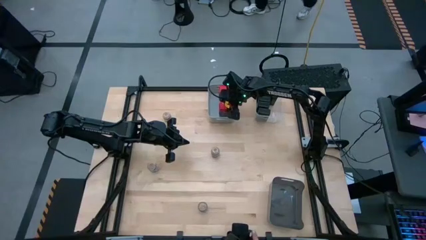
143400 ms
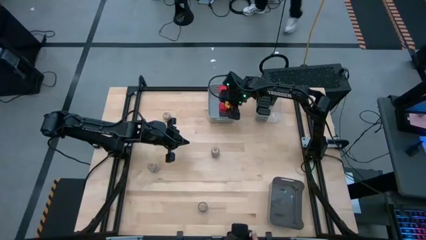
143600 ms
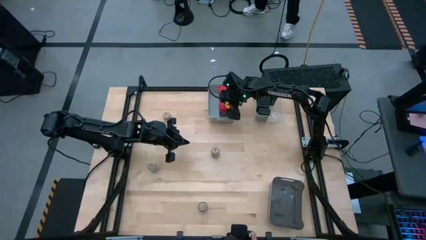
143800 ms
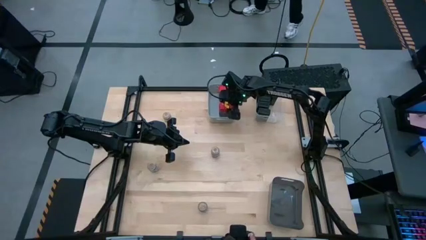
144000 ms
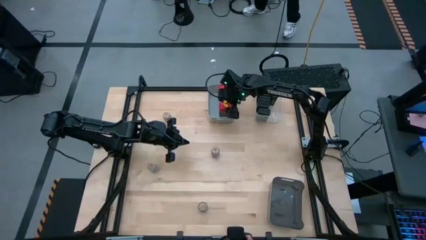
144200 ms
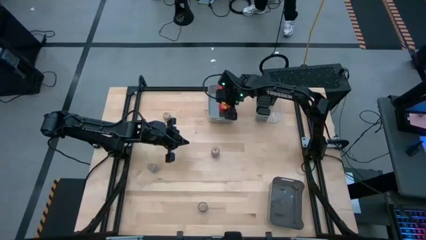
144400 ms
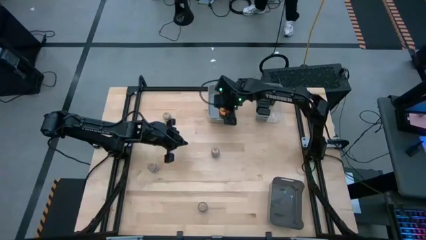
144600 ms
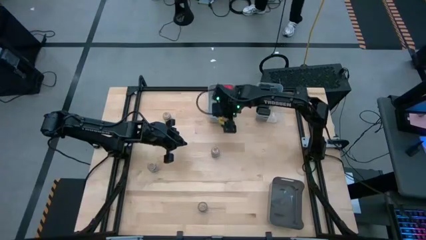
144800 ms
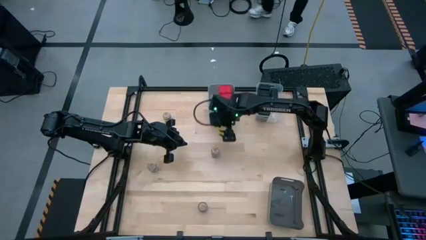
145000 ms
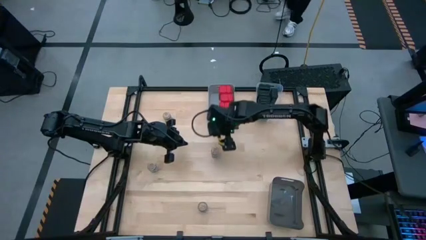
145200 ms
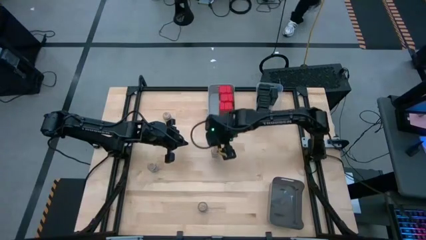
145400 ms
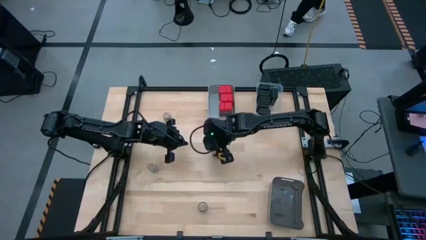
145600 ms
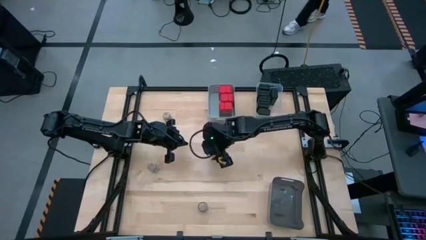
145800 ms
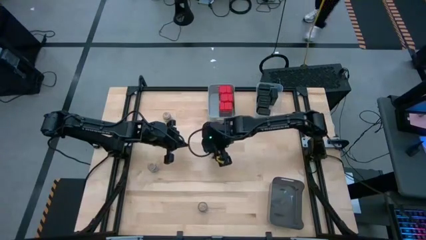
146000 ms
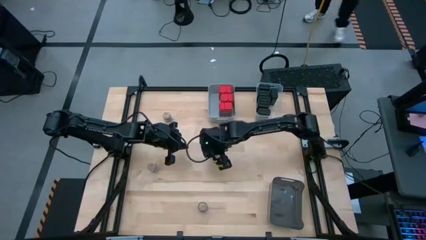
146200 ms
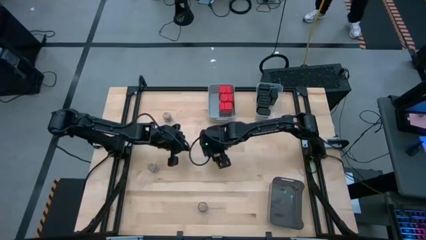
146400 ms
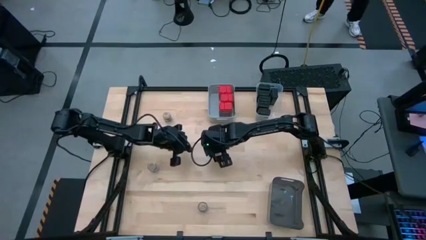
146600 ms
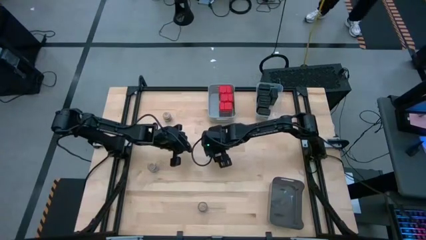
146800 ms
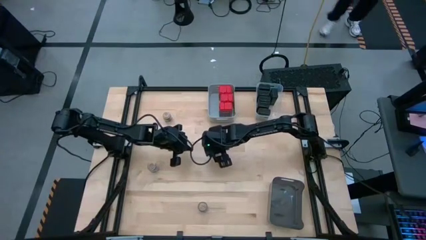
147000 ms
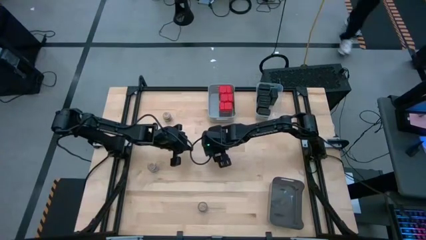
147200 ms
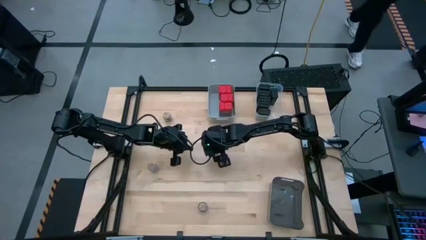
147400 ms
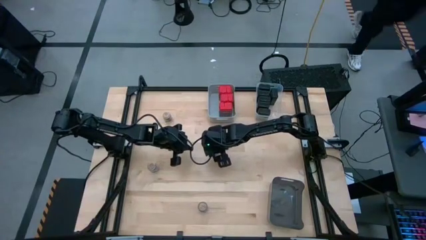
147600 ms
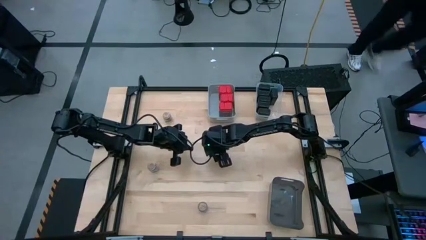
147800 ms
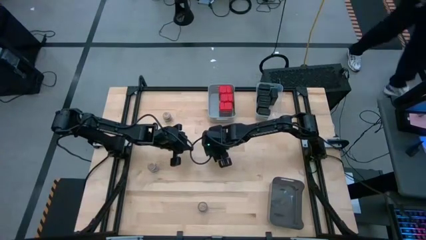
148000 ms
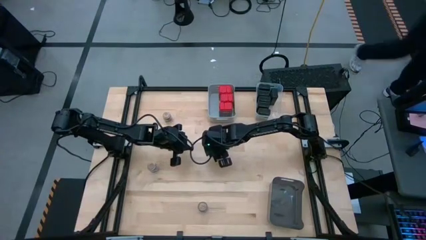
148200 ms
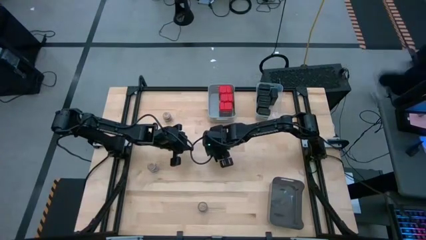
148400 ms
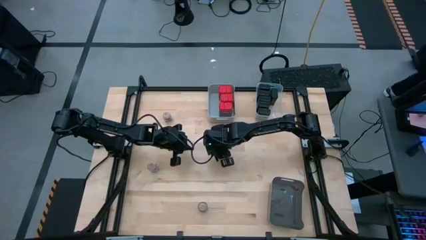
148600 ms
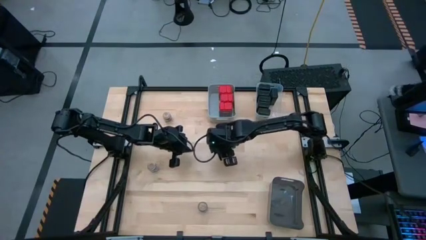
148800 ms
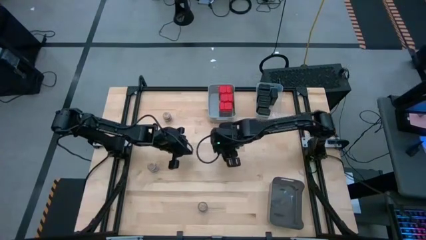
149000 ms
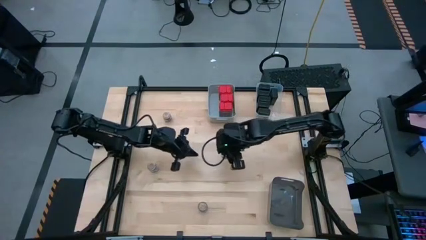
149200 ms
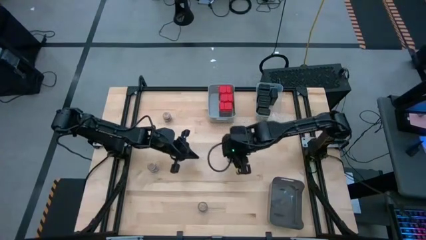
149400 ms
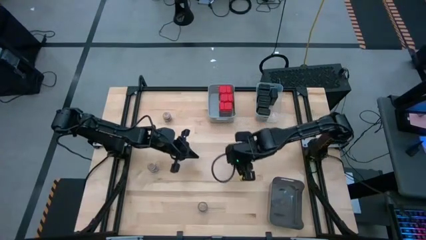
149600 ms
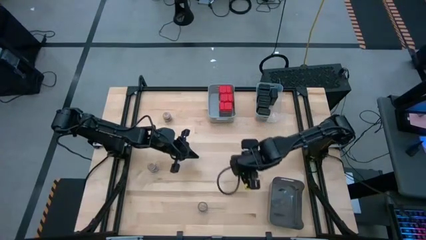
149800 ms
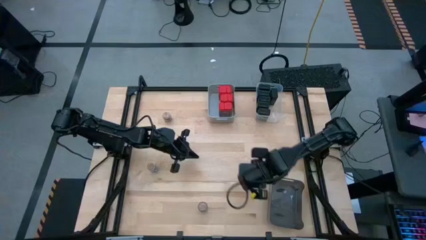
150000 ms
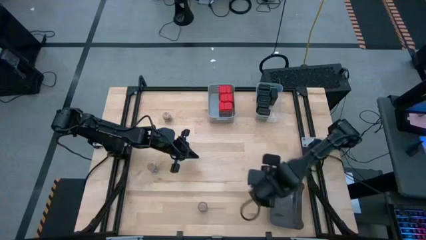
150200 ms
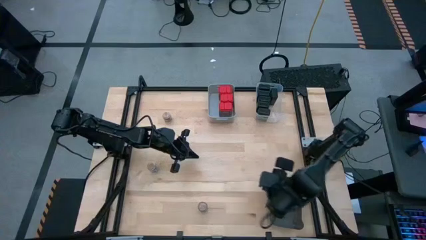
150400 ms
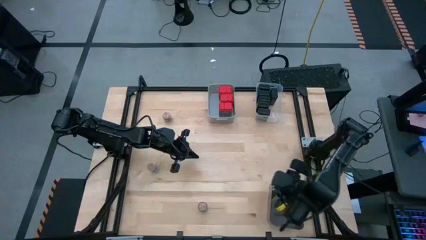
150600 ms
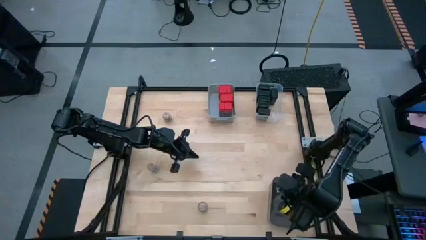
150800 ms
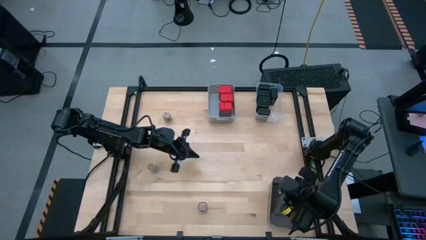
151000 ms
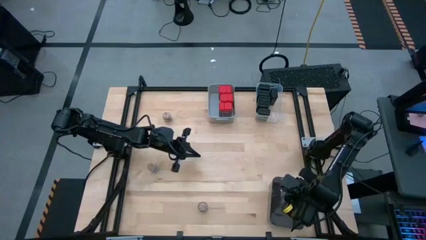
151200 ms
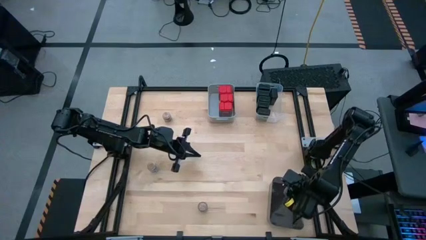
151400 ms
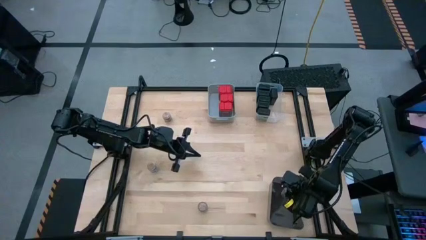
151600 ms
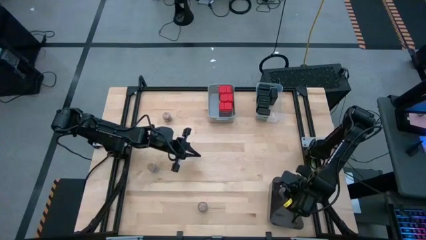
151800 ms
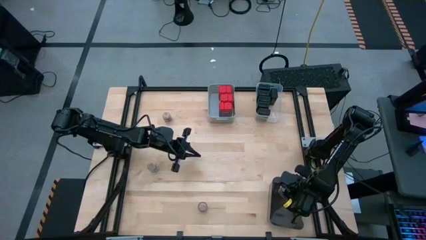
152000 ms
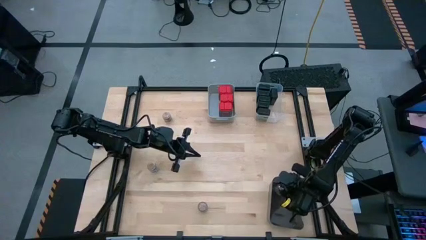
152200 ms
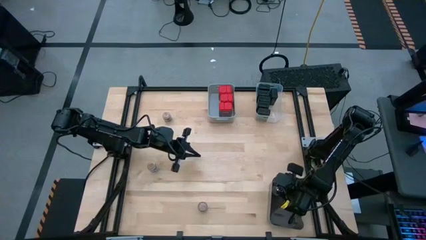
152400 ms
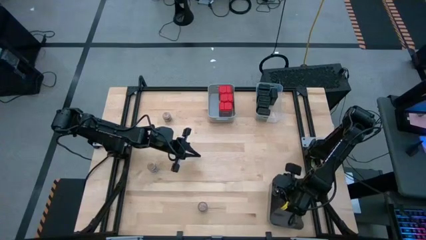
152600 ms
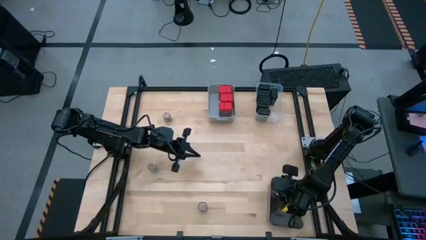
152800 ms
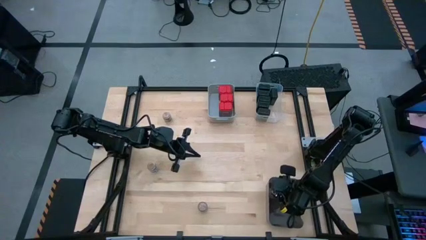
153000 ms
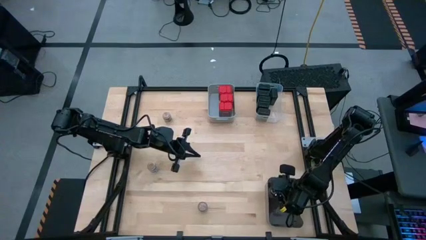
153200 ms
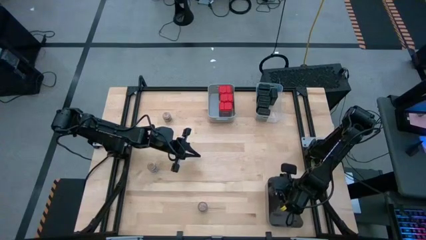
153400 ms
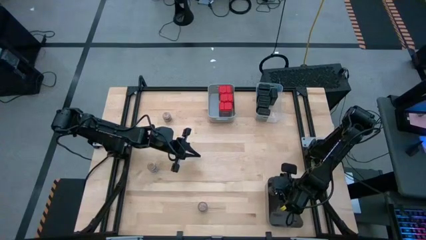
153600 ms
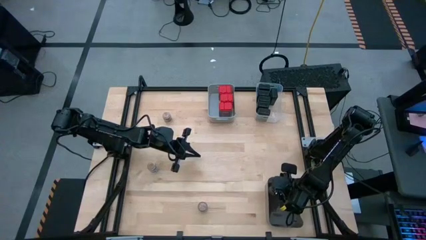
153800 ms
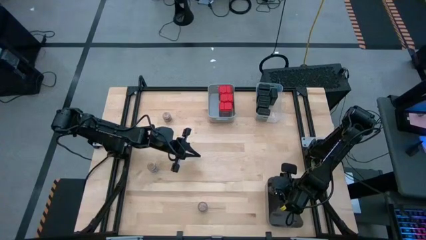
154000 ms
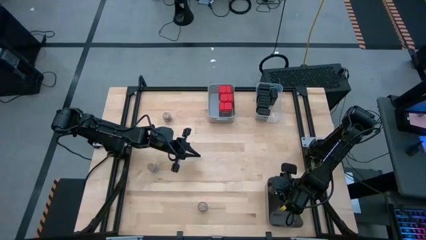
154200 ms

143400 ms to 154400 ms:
Task: Sort spices by type
Put the brown seasoning bottle into the black bin

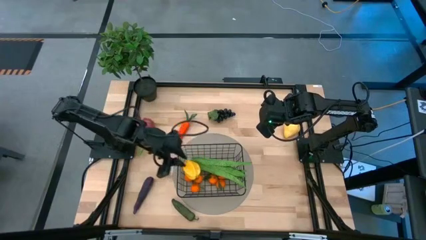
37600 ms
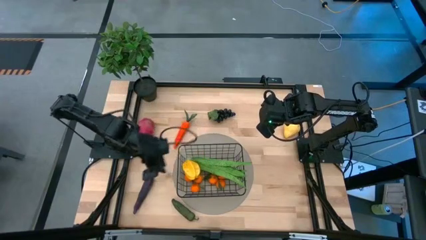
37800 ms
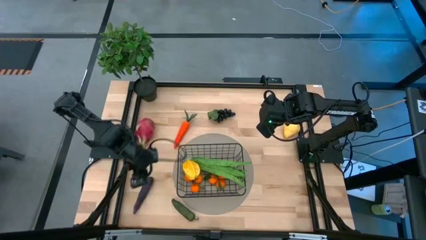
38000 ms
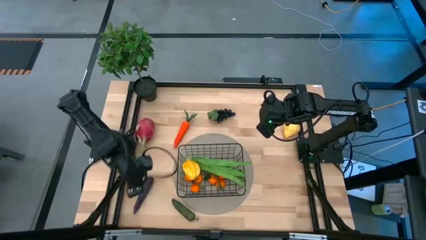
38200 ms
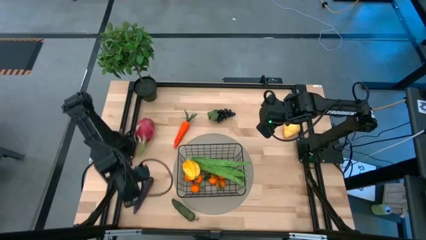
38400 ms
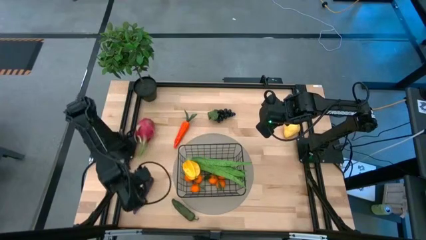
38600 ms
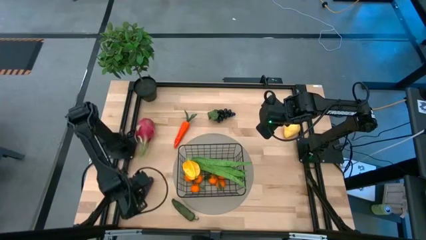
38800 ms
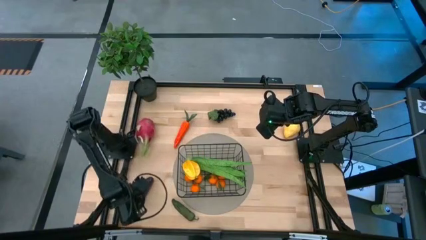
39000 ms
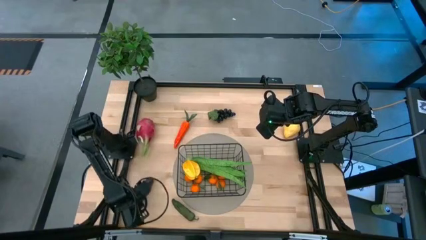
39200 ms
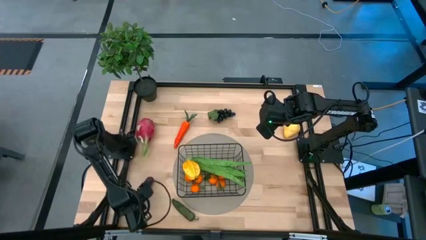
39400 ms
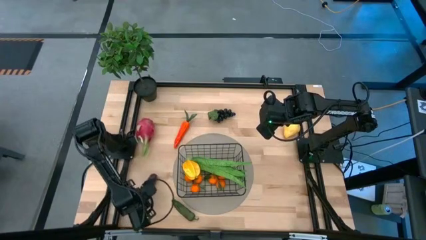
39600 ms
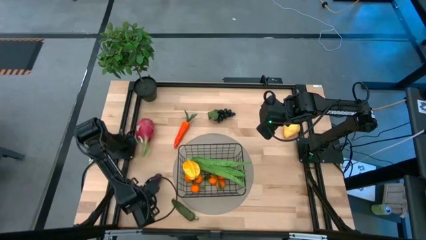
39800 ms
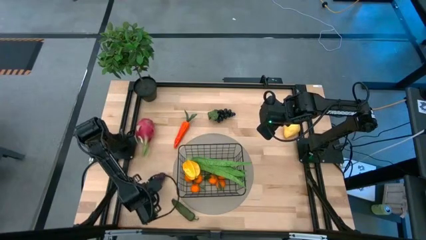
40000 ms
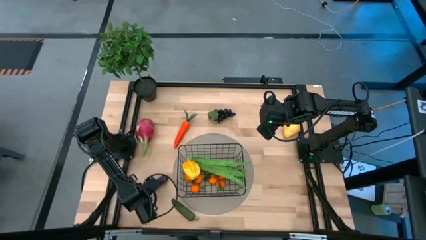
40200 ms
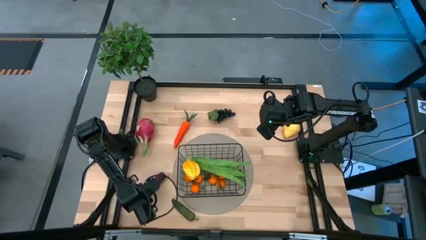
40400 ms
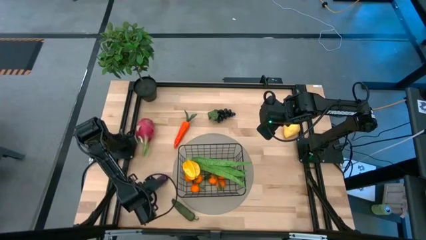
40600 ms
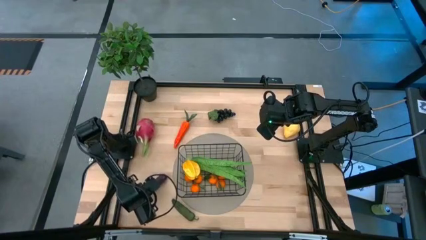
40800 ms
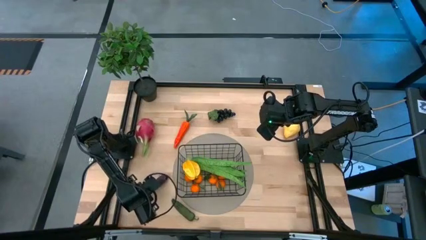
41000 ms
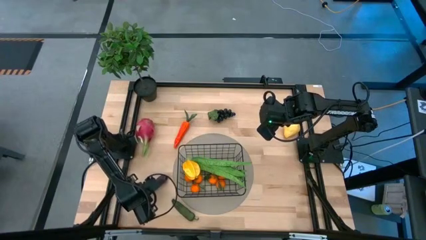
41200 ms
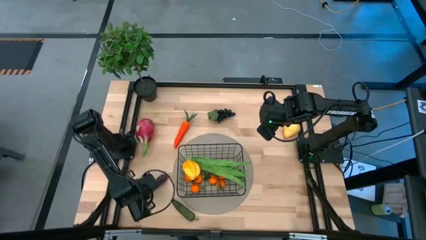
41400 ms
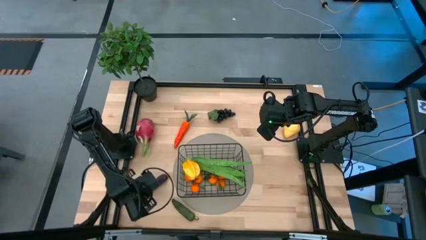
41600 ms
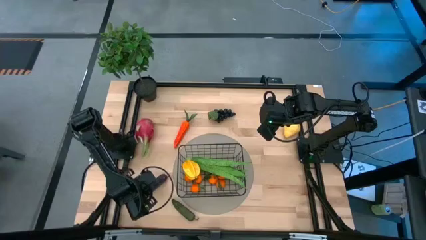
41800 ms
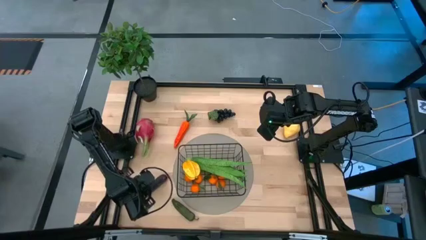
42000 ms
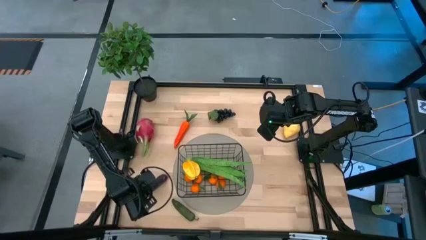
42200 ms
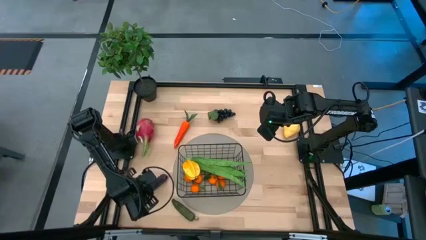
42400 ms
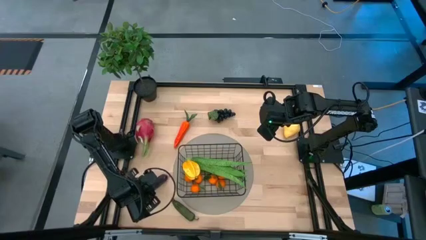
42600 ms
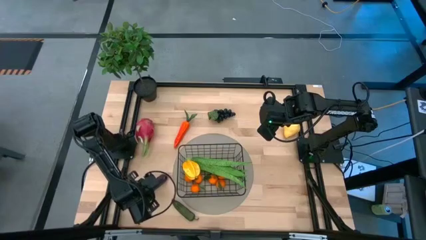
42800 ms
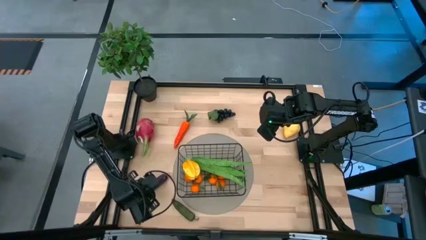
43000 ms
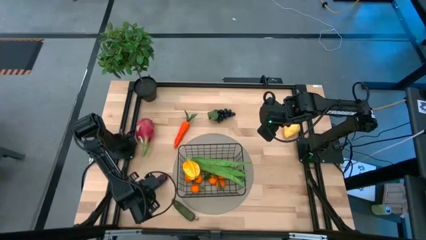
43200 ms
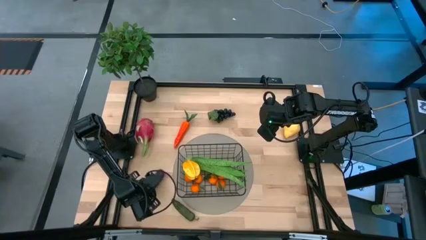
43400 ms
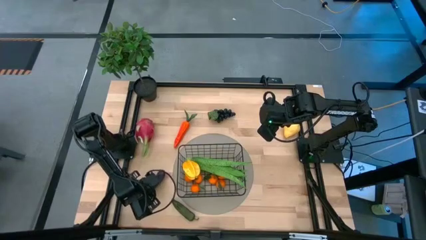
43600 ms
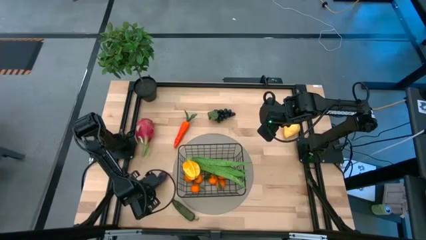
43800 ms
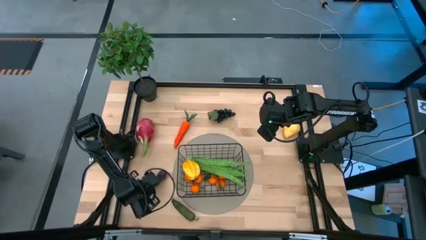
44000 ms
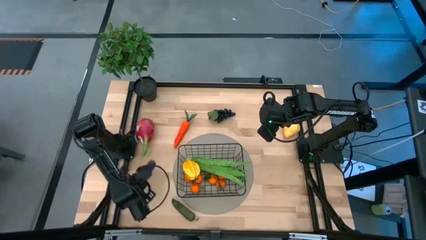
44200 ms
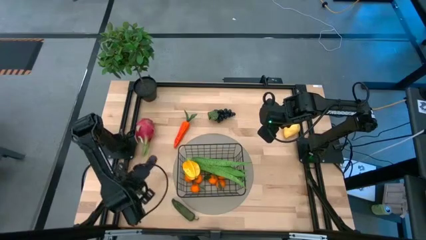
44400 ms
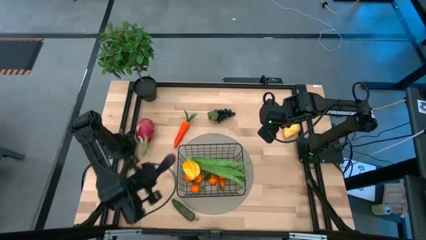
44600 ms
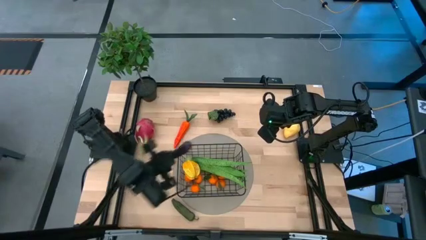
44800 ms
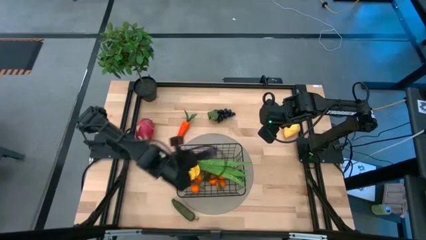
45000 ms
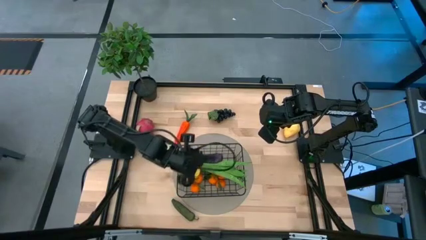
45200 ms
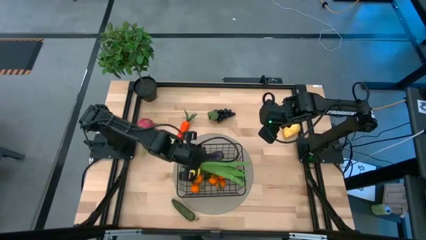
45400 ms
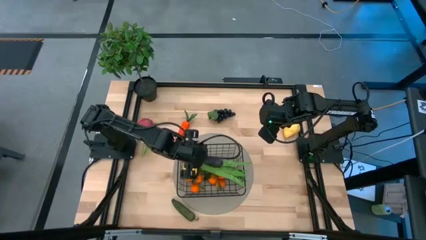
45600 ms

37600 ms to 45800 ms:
Task: Build produce basket
Put the eggplant into the black basket
